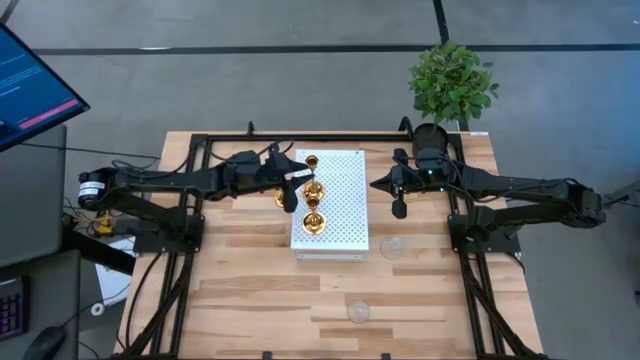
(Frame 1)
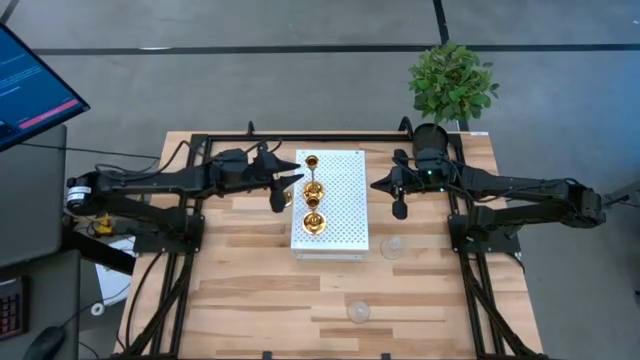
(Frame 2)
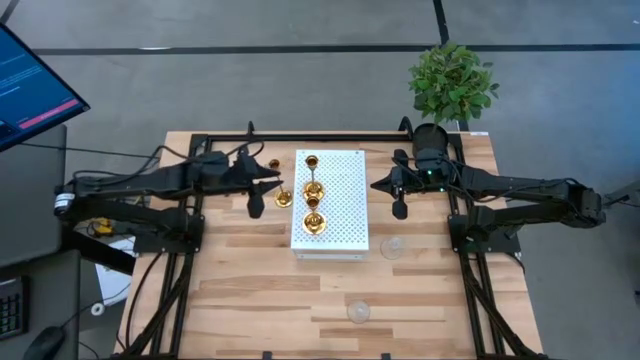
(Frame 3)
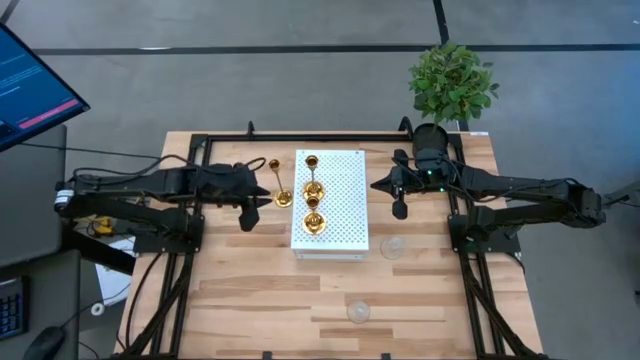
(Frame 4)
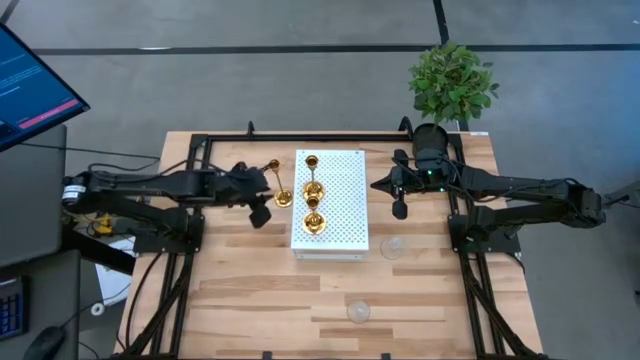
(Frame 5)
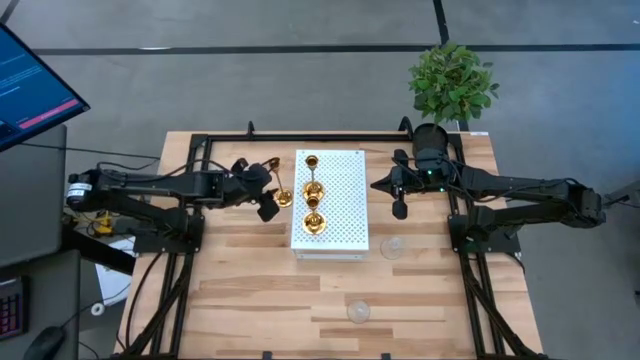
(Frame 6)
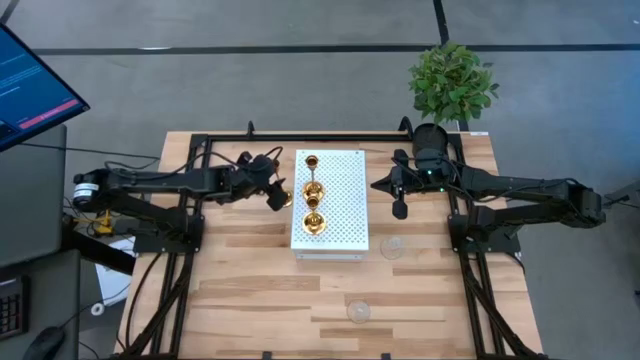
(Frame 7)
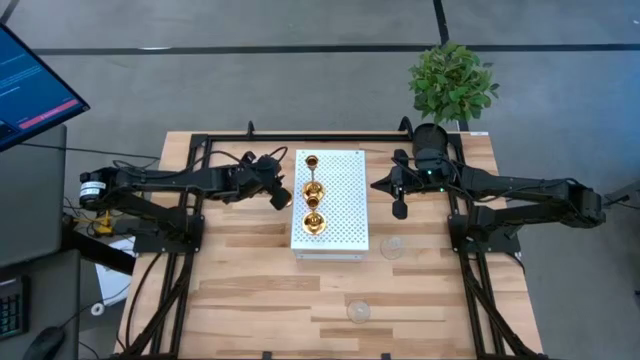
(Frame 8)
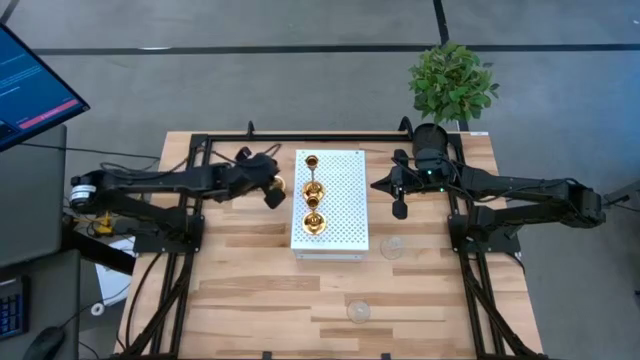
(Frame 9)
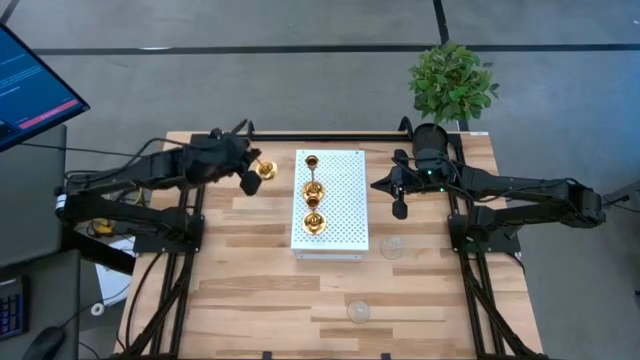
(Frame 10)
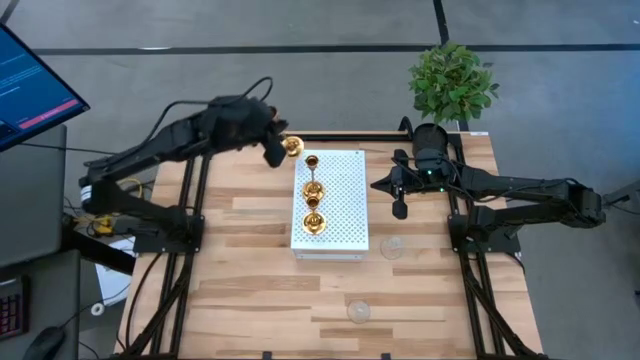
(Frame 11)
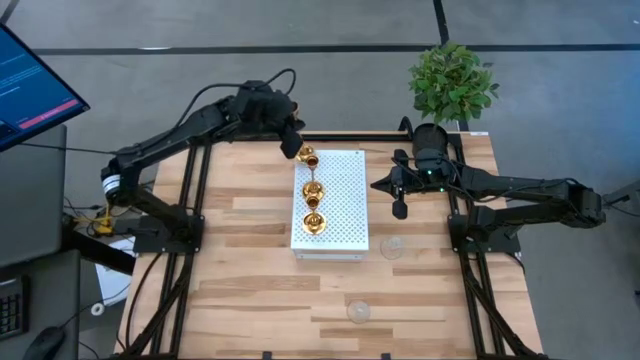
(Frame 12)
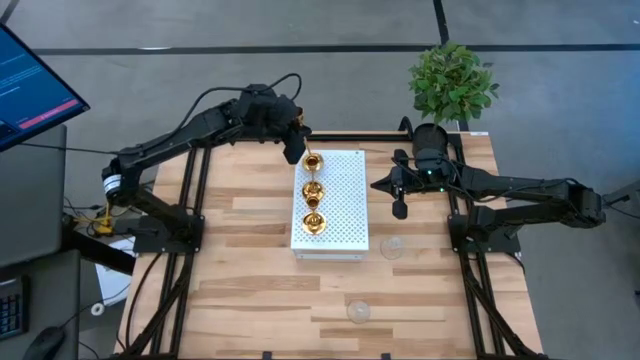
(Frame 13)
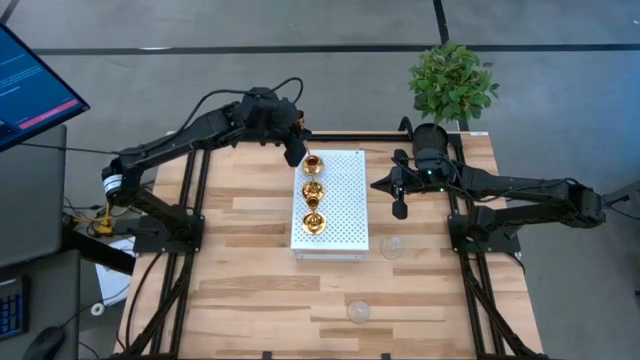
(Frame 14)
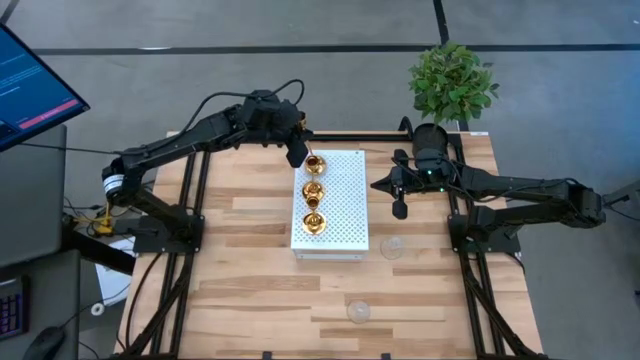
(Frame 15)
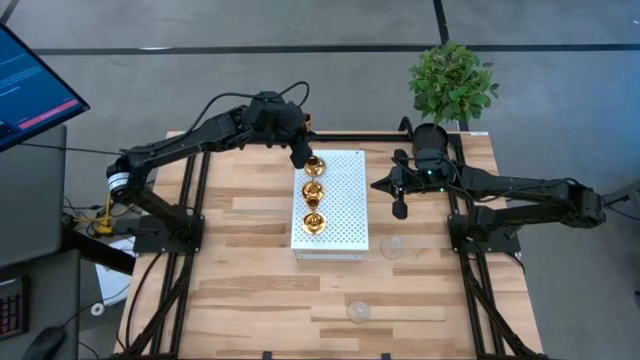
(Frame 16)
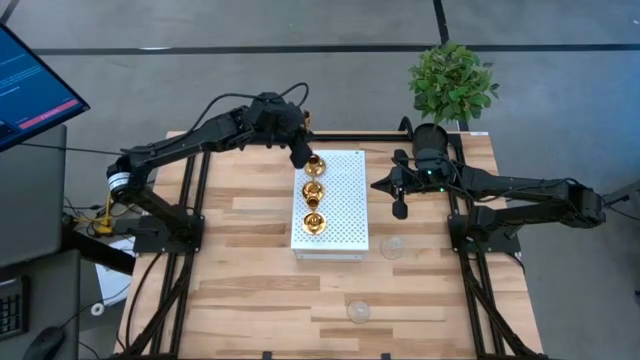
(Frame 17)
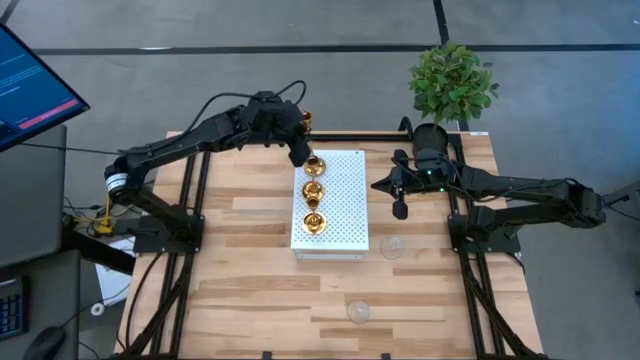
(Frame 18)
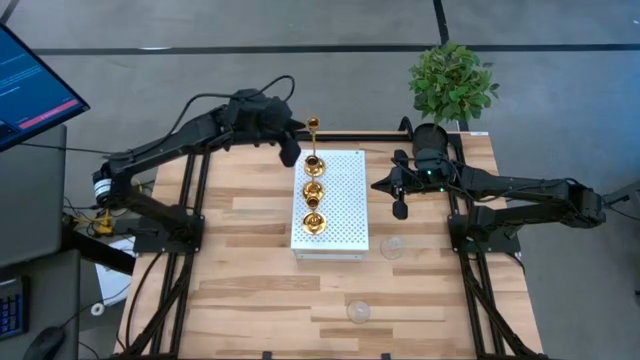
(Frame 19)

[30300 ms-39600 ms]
Task: Pick & Place candle stick holders
Put the gold candle holder on the shelf aligned with the other gold candle holders

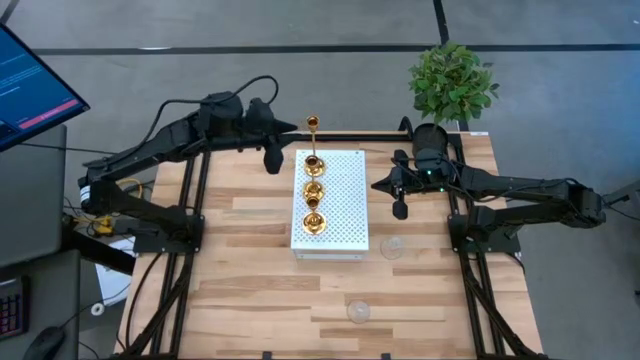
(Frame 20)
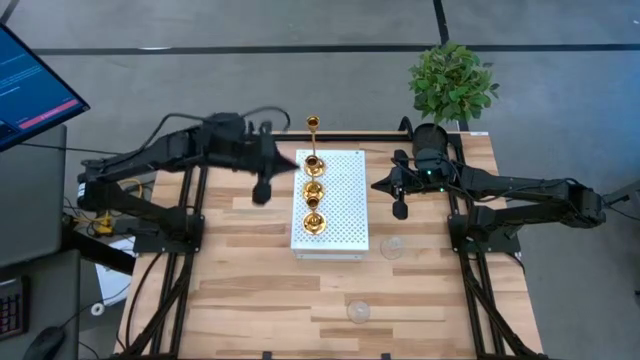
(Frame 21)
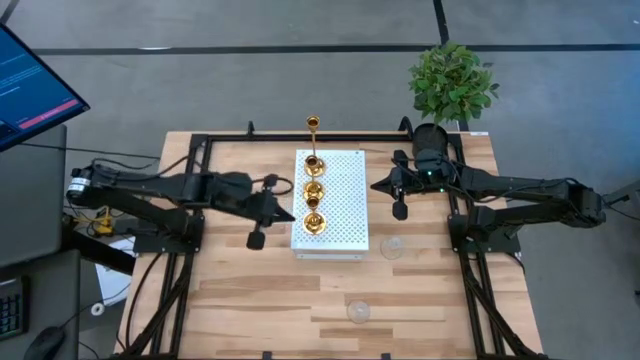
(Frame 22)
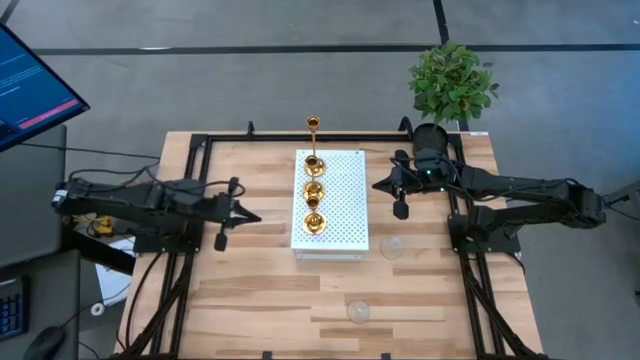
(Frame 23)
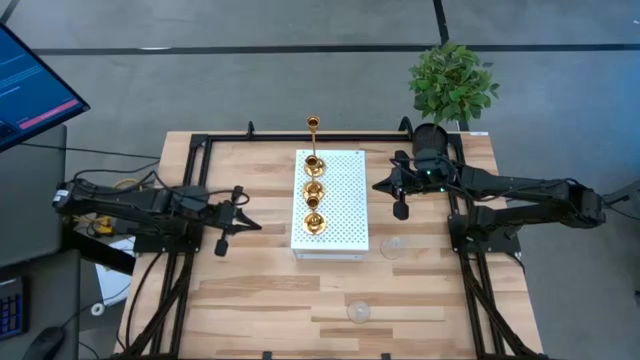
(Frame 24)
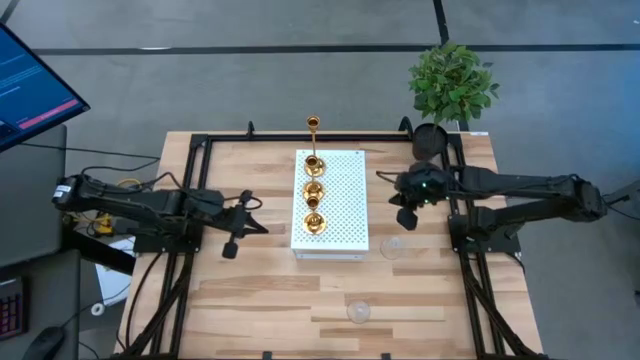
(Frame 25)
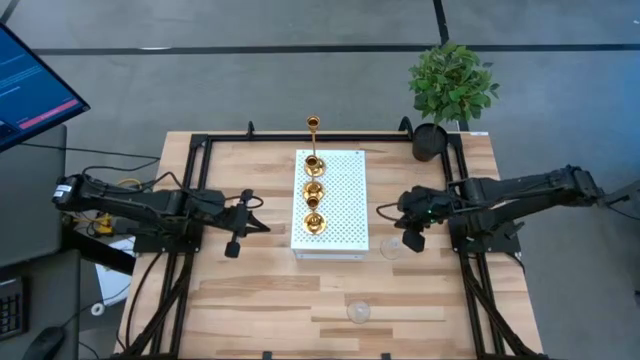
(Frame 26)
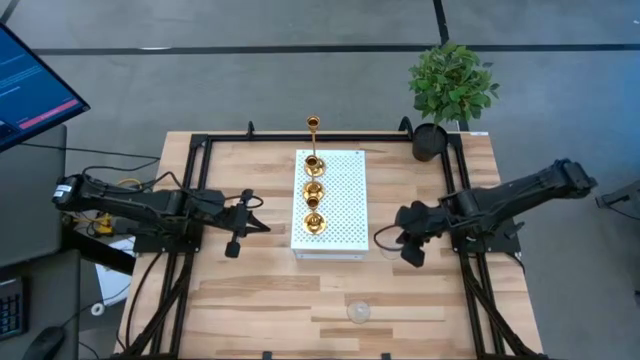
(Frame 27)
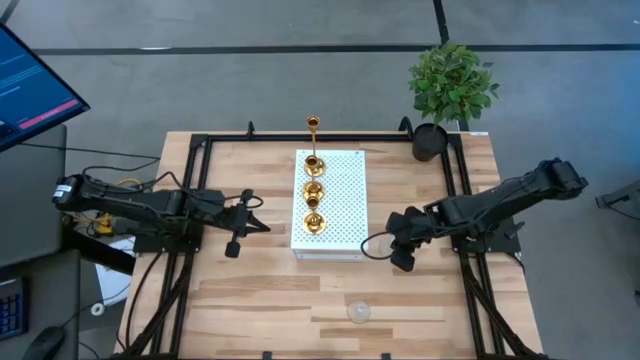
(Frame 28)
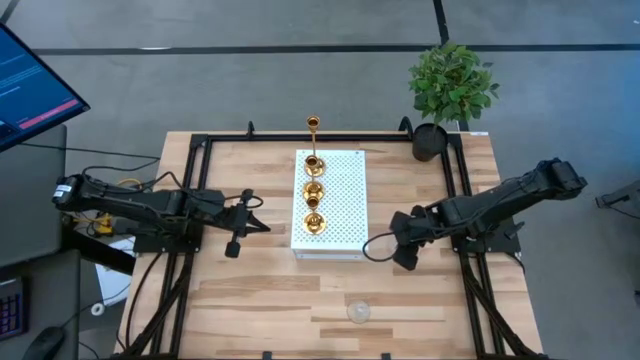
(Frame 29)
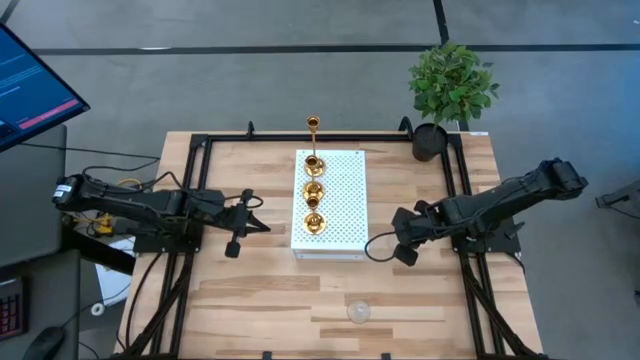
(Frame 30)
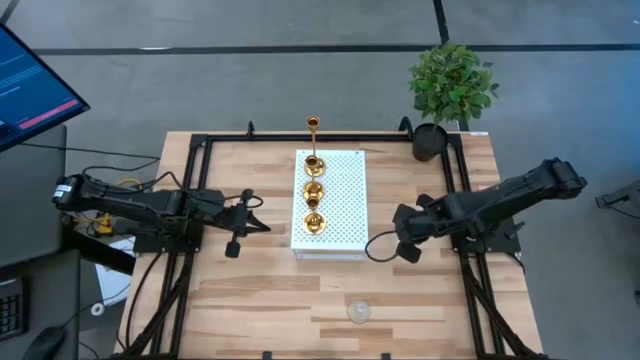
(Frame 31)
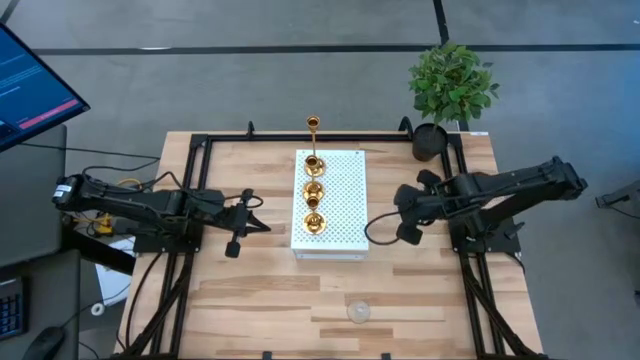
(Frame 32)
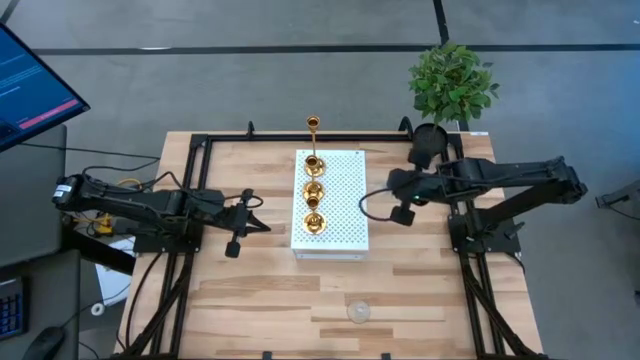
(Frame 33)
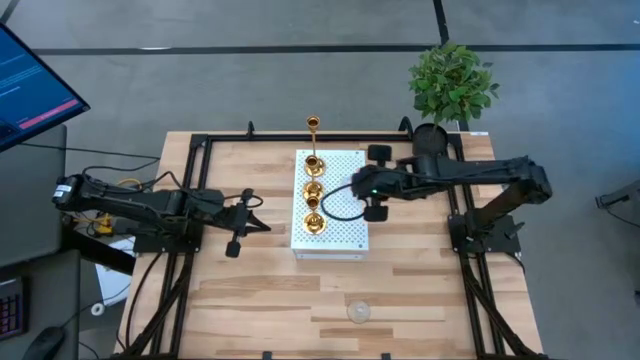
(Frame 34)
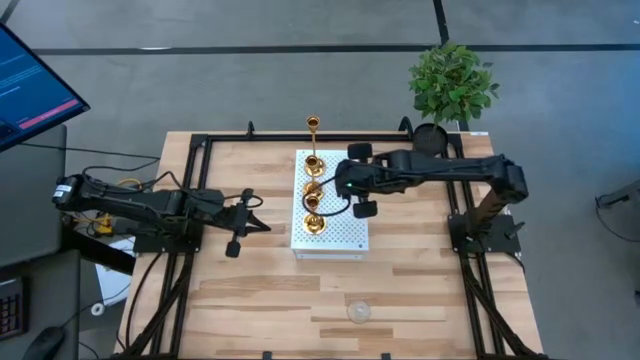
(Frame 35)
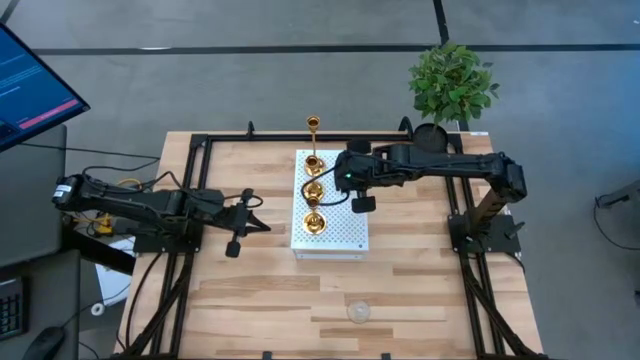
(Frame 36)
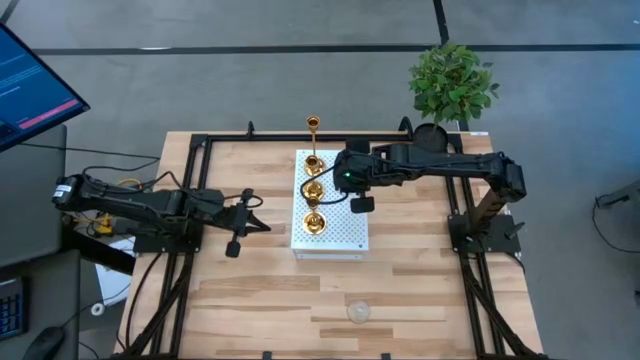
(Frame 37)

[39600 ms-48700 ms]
Put the top transparent candle holder on the shelf

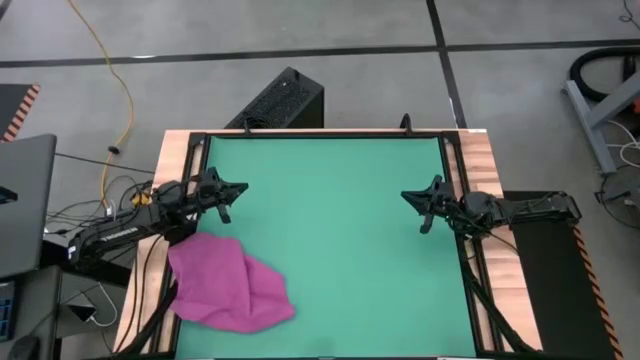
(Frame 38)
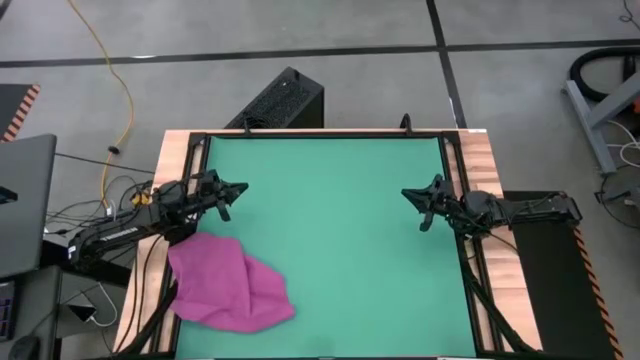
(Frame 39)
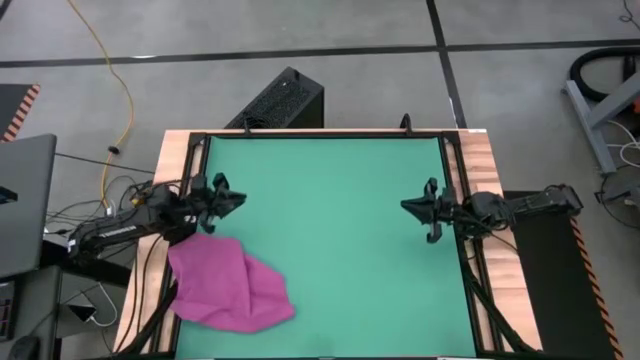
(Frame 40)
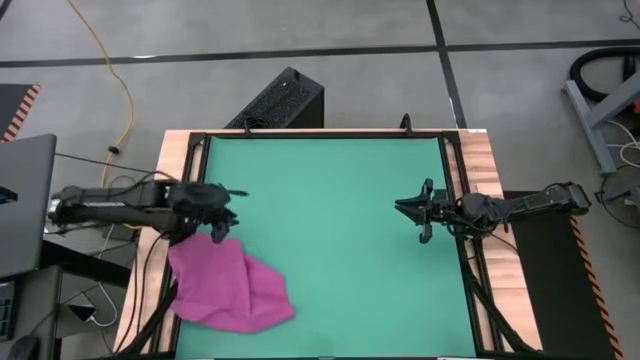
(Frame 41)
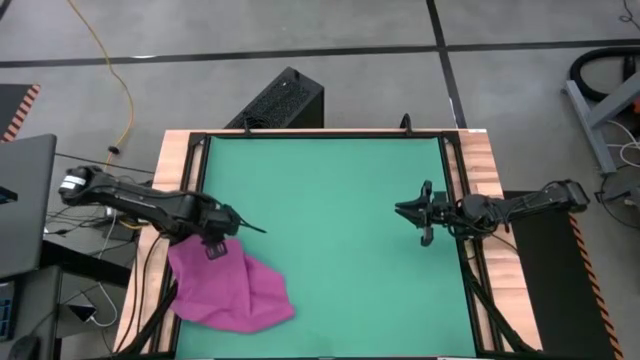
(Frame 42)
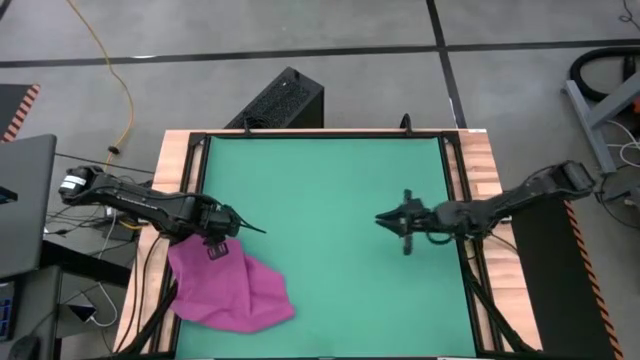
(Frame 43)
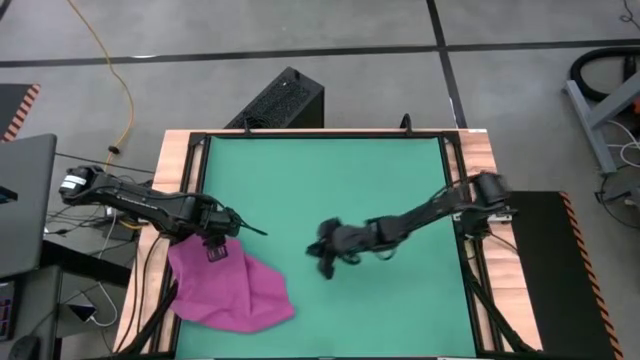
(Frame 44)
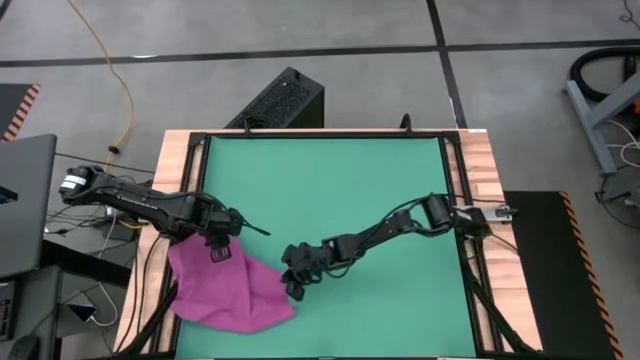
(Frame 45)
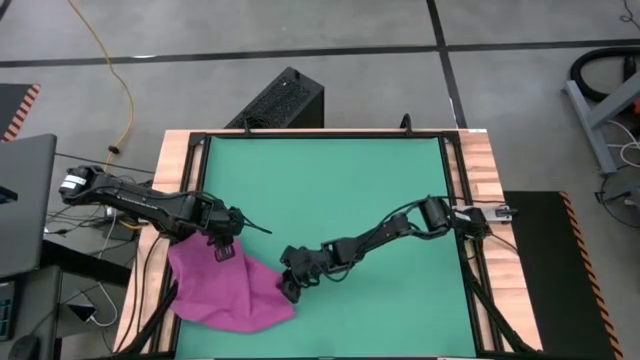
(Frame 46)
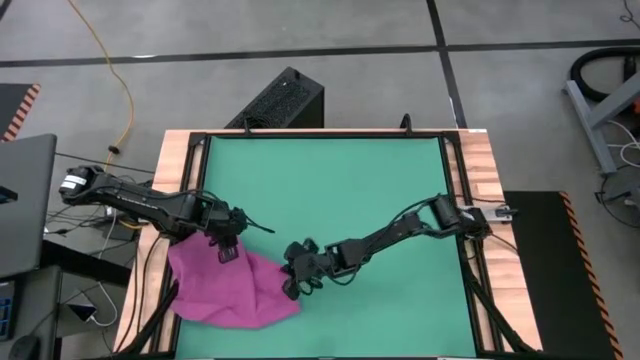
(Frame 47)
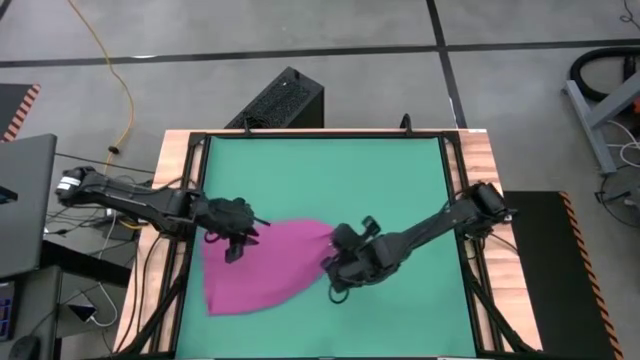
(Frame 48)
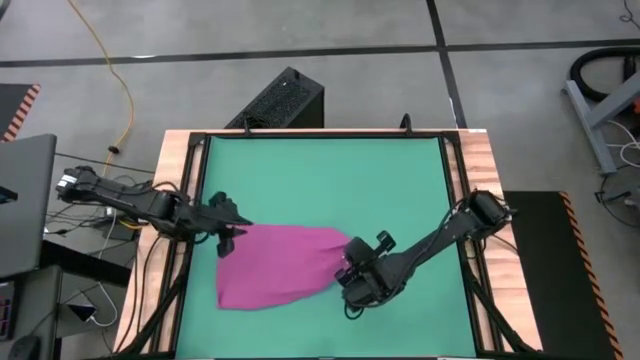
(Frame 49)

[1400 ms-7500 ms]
Task: Roll towel into tight, uniform cylinder
Roll the pink towel
